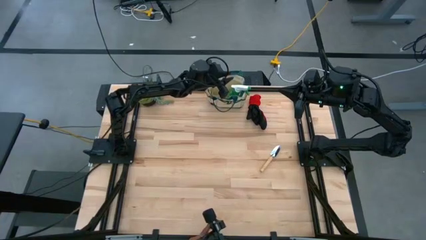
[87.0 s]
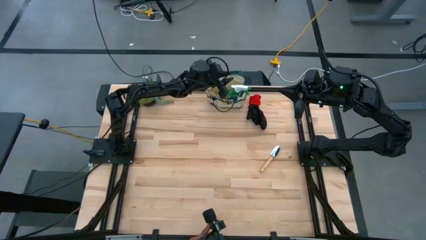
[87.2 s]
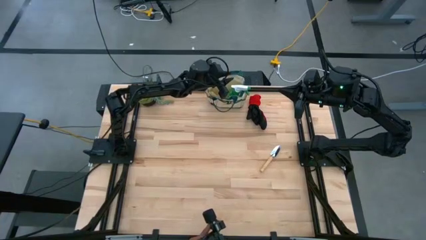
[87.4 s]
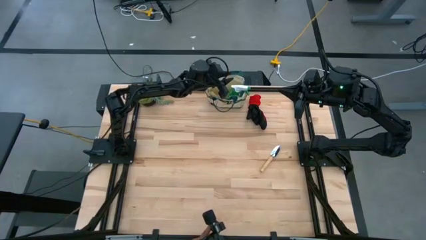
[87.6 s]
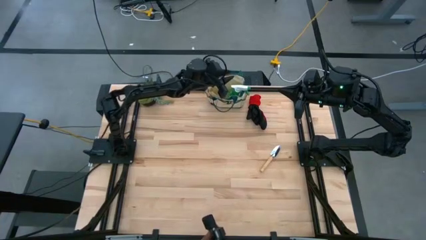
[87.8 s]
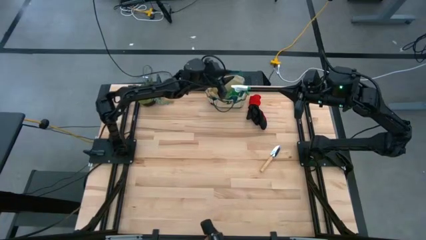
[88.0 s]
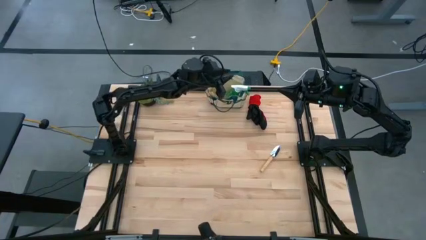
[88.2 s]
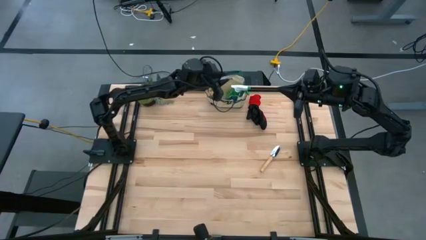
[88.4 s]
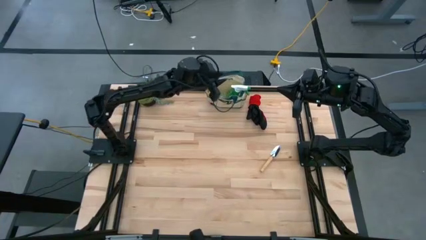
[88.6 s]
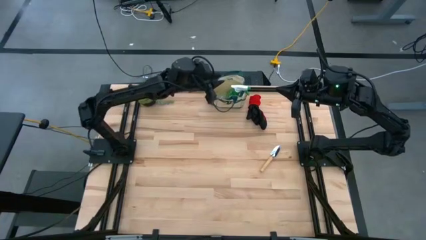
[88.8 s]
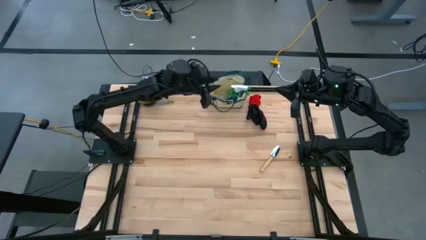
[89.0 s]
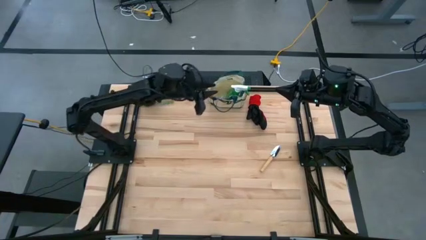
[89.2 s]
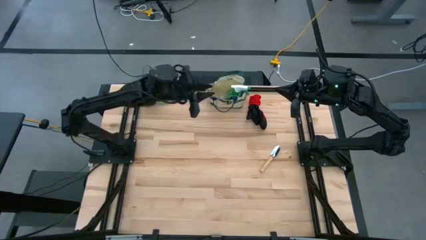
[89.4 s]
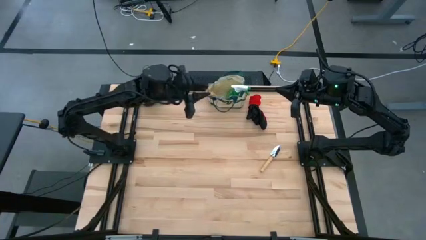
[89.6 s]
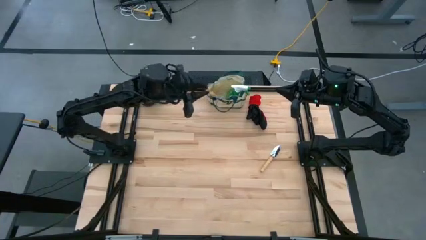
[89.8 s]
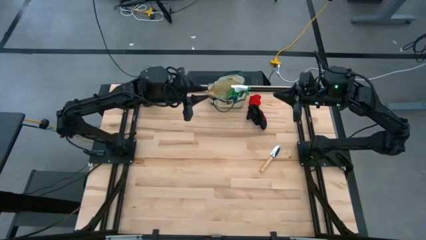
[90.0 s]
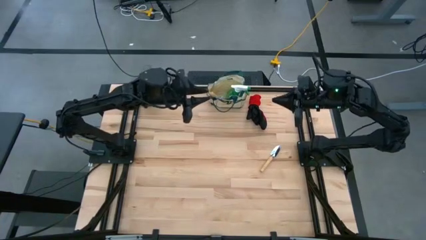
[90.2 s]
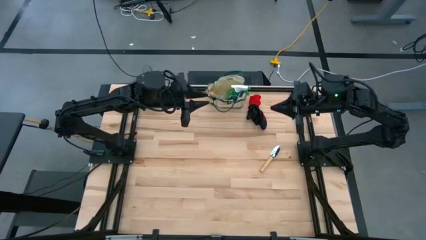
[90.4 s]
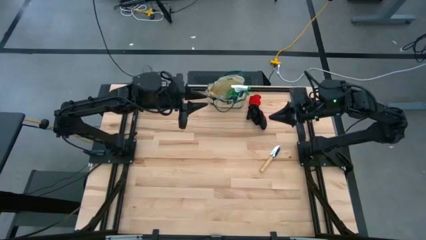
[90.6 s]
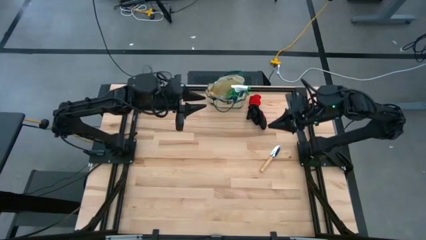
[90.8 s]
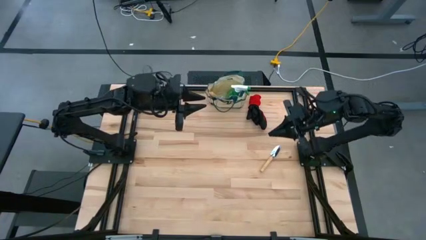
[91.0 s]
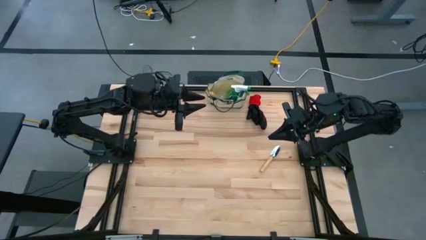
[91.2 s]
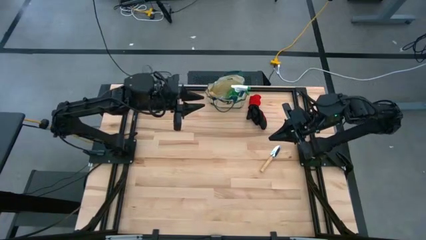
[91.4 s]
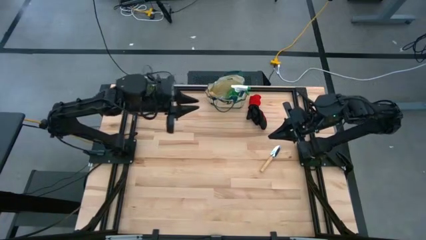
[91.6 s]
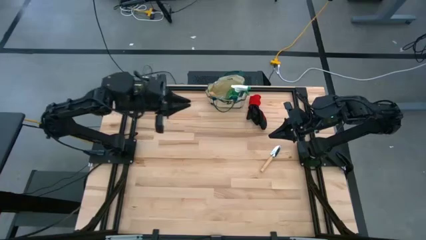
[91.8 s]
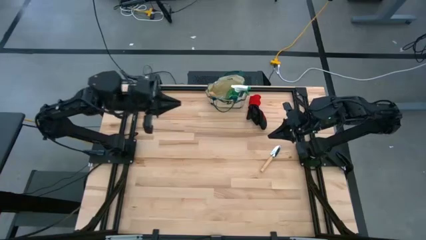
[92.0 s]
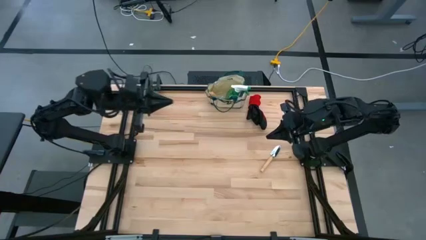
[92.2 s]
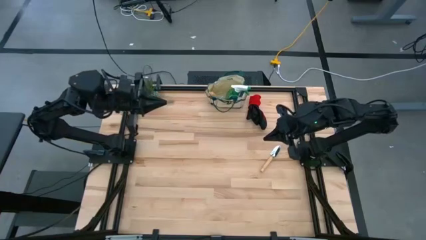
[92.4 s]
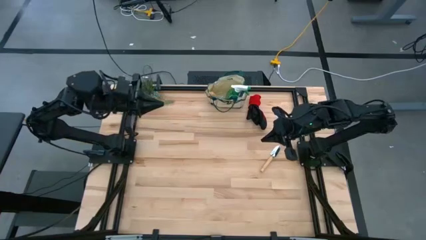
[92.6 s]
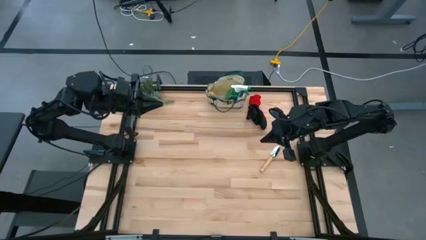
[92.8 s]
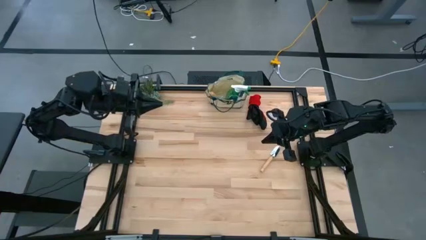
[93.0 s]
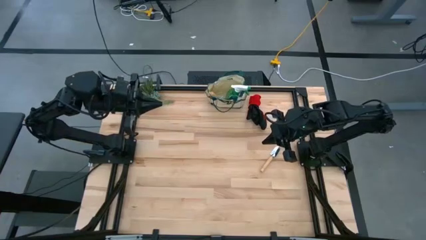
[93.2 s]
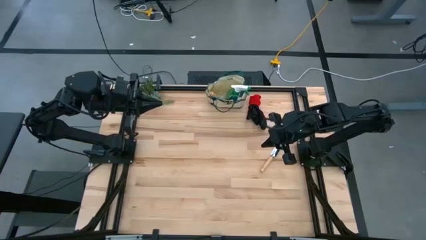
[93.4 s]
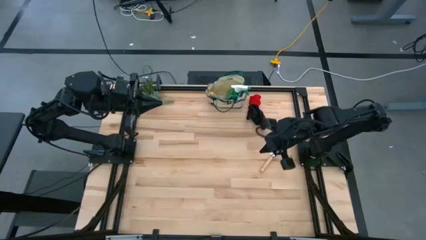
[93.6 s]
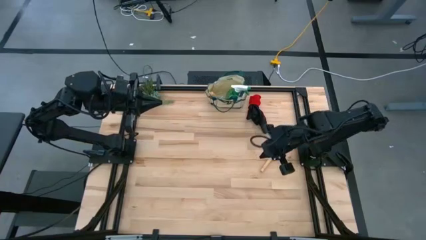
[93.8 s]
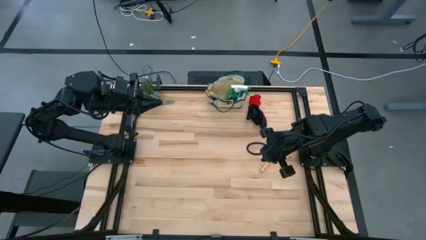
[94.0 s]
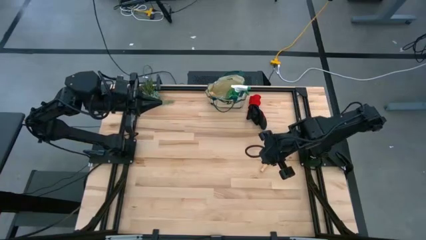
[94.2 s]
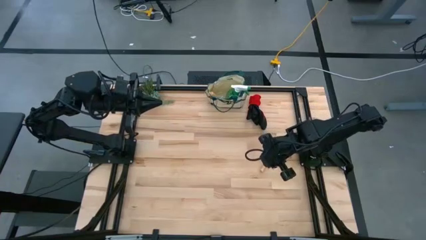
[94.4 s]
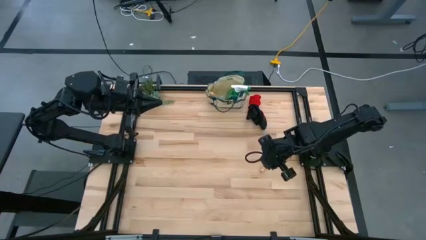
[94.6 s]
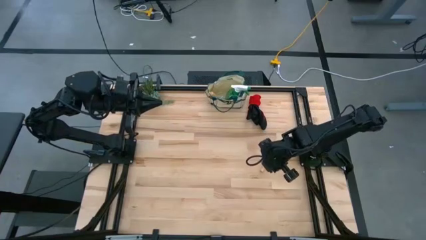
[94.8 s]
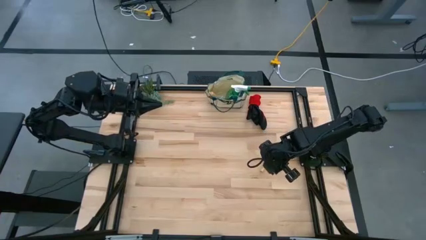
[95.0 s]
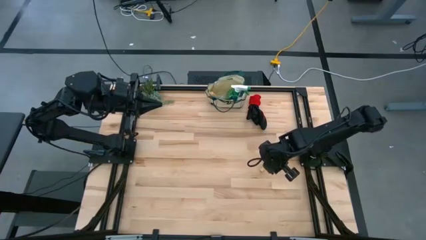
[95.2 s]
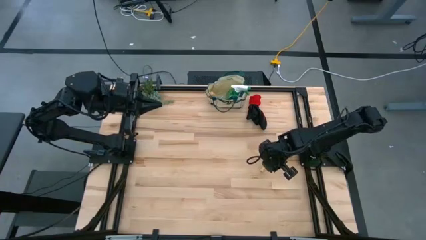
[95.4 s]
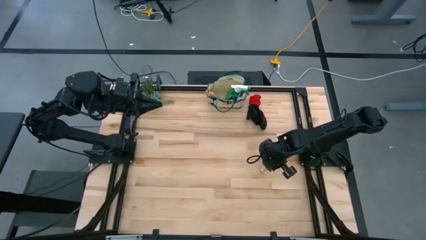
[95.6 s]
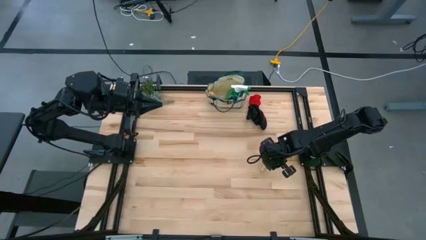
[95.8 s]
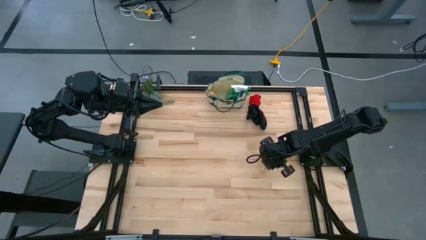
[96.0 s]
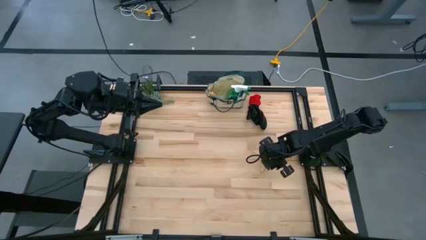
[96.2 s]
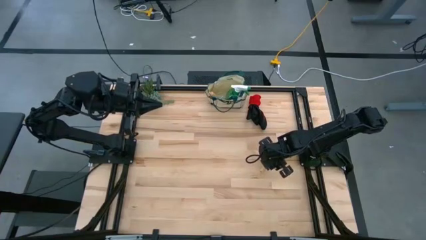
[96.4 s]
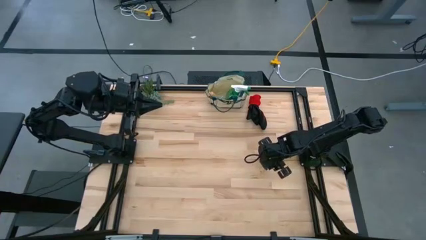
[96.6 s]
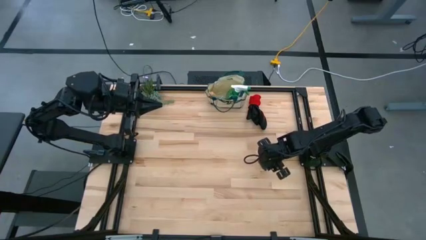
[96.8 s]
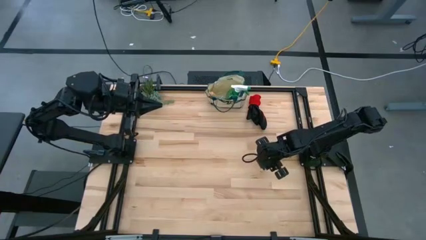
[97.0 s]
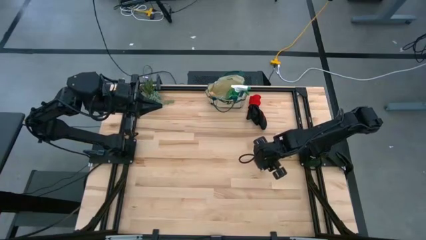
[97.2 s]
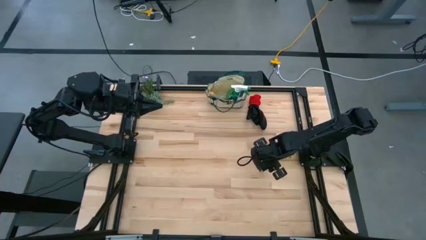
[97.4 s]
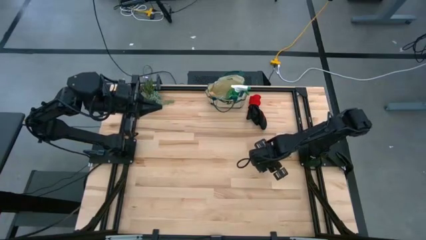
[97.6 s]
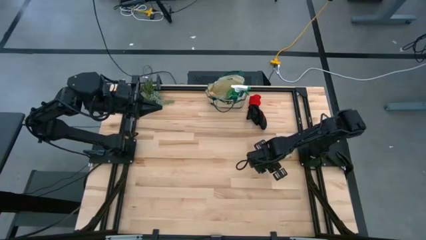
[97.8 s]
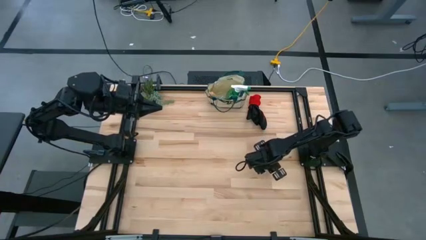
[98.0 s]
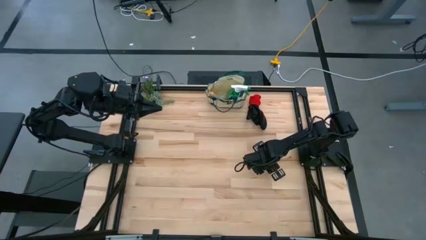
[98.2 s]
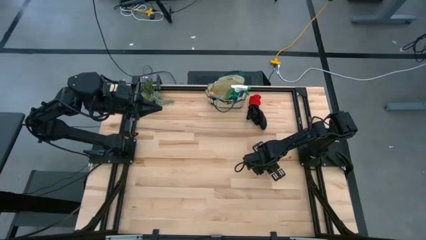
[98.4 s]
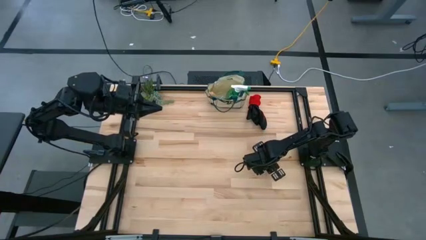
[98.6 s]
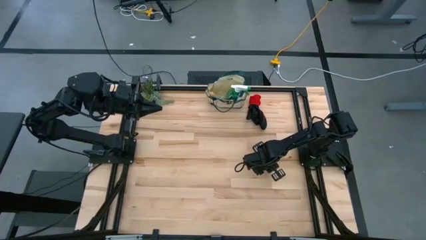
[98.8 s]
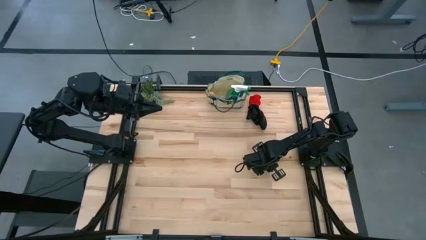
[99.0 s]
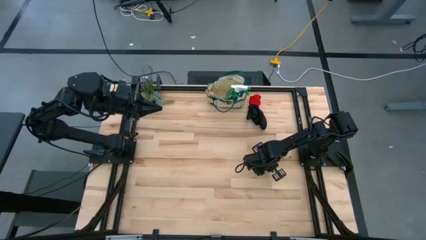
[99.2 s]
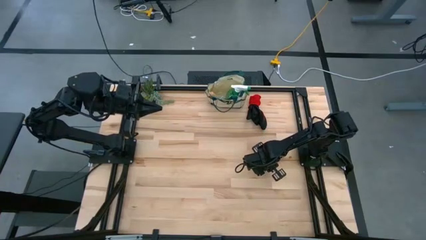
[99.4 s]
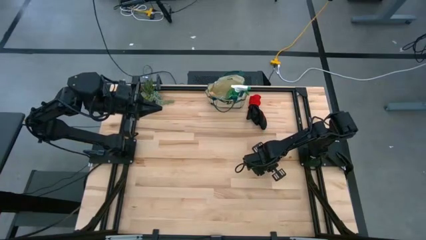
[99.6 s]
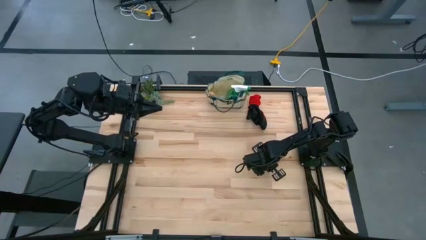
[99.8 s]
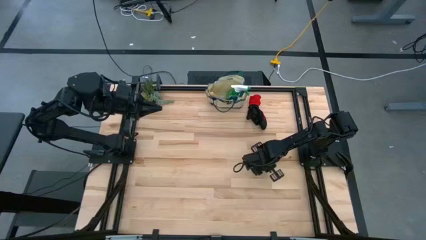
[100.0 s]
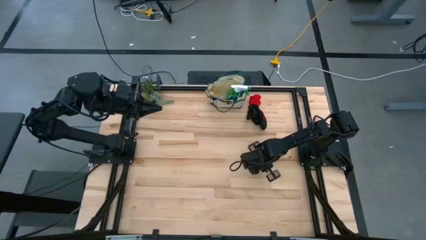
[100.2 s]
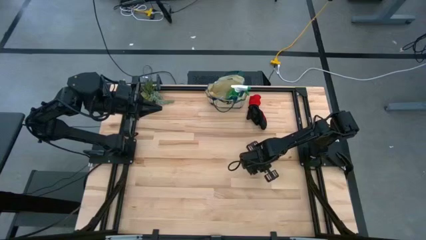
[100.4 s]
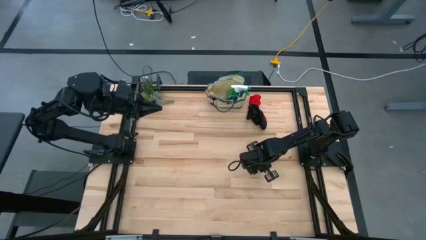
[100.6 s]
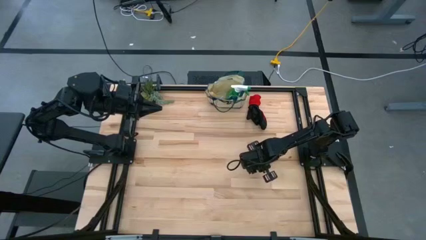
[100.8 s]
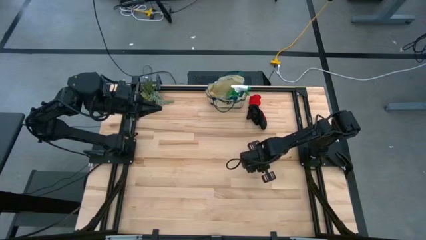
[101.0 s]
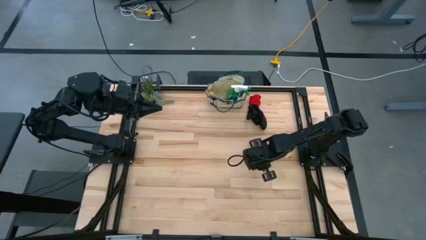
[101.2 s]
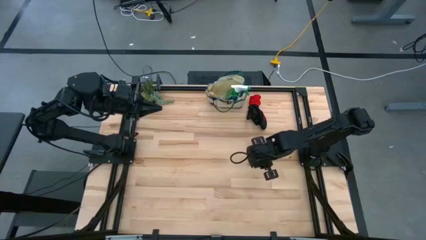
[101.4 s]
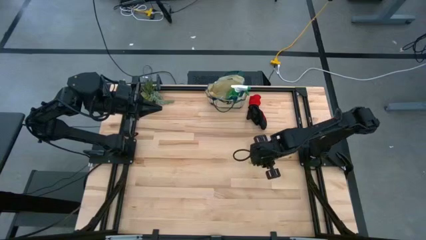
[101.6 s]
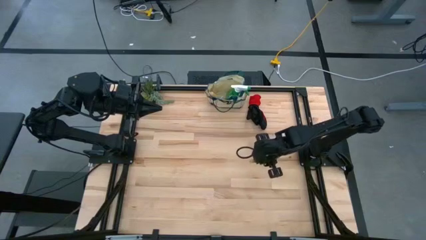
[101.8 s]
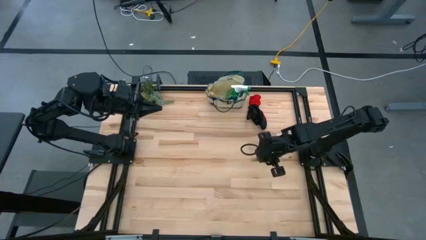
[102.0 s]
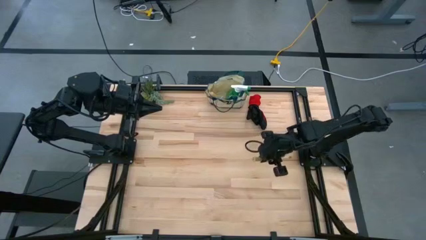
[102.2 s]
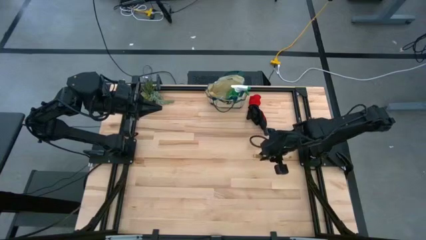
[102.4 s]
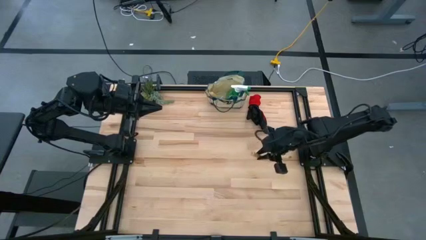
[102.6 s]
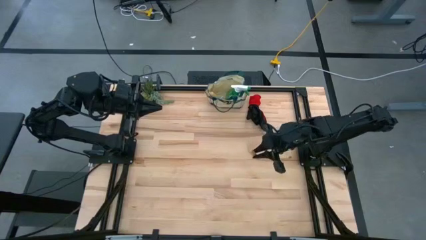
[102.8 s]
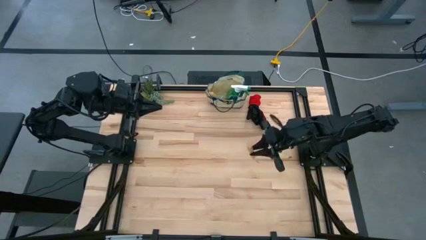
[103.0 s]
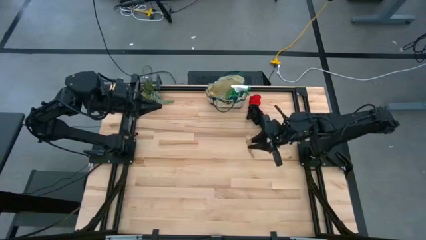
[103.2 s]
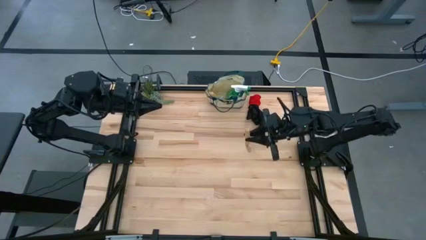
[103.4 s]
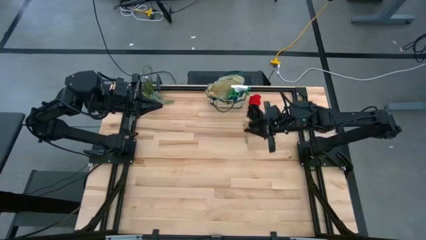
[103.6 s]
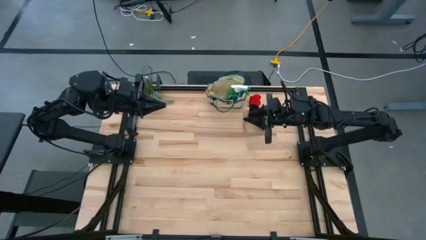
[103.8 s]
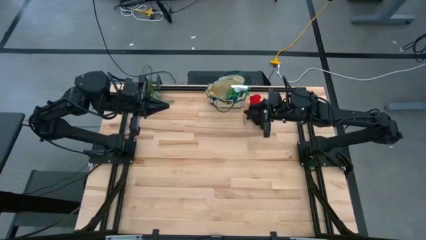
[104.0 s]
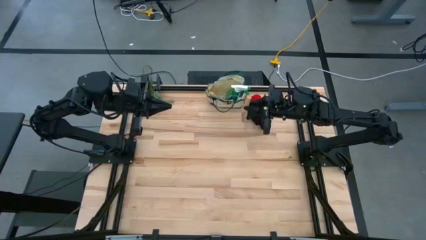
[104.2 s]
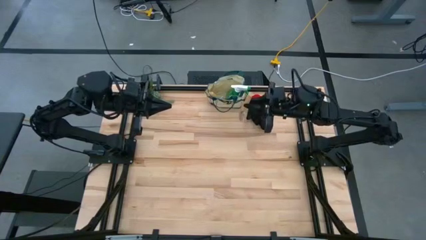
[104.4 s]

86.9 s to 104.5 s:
Task: Pick & Place Garden tools in Gardening bag
Put the brown trowel into the white gardening bag
